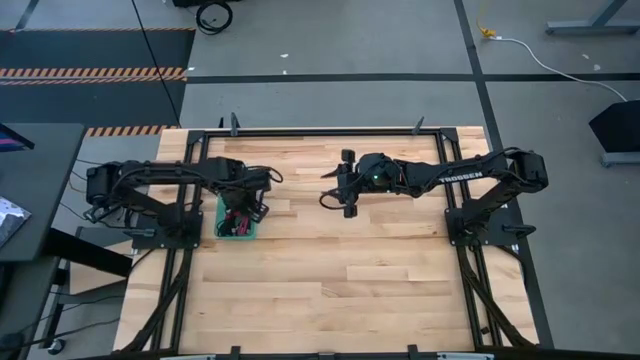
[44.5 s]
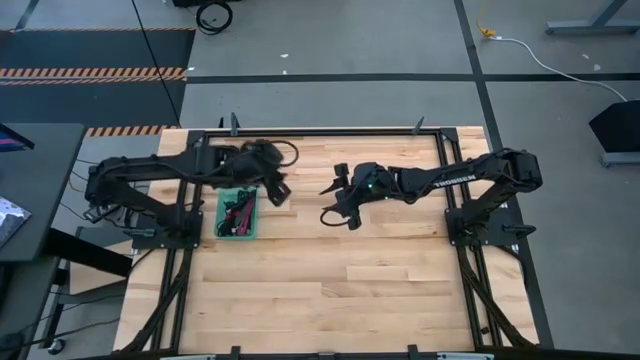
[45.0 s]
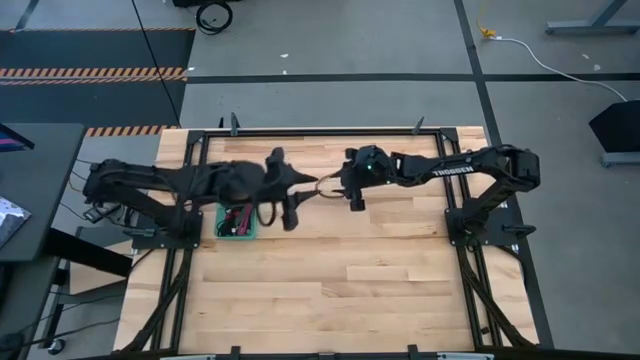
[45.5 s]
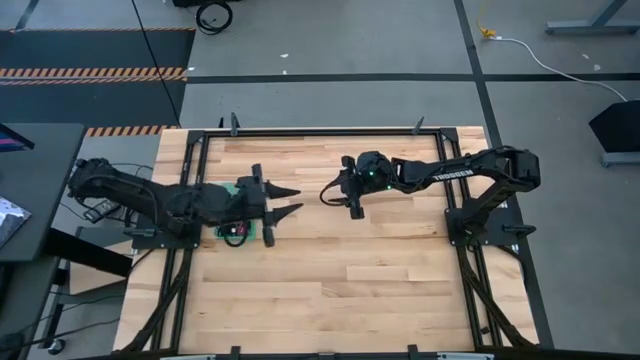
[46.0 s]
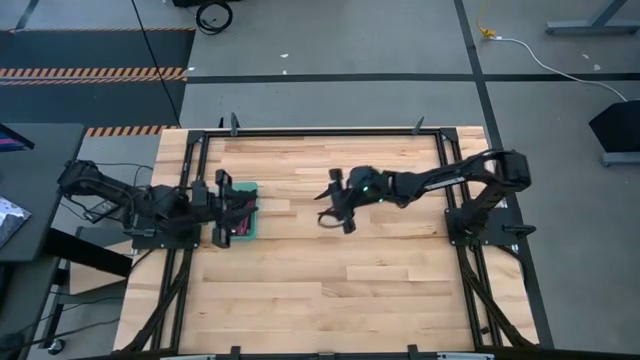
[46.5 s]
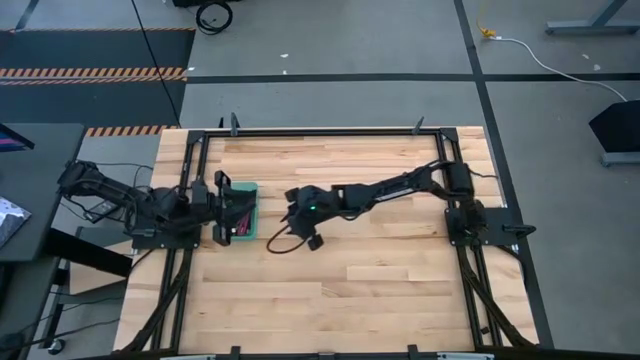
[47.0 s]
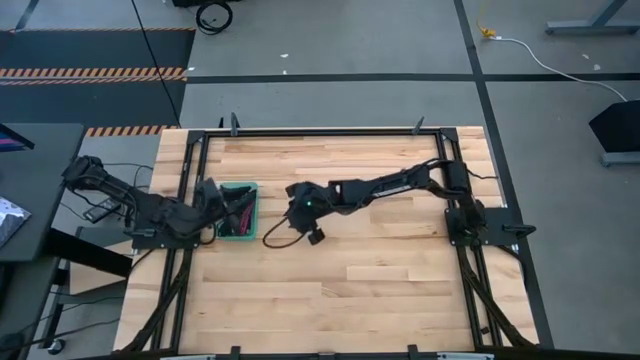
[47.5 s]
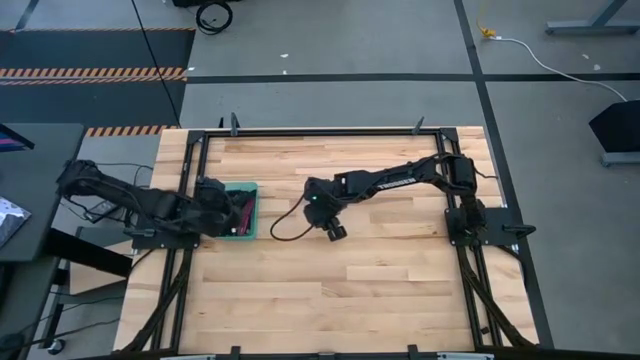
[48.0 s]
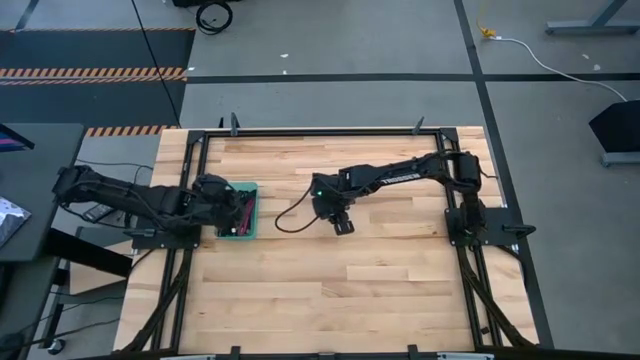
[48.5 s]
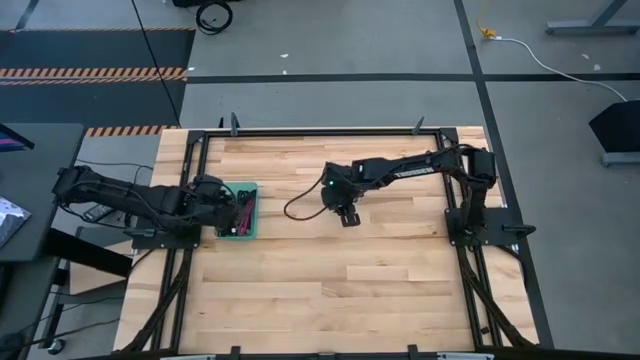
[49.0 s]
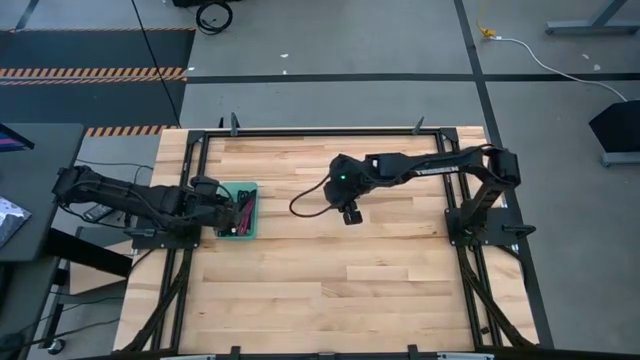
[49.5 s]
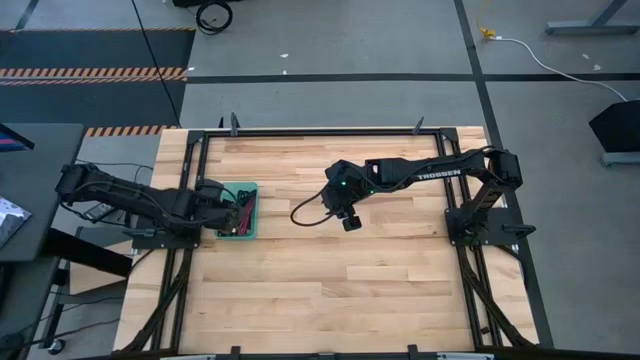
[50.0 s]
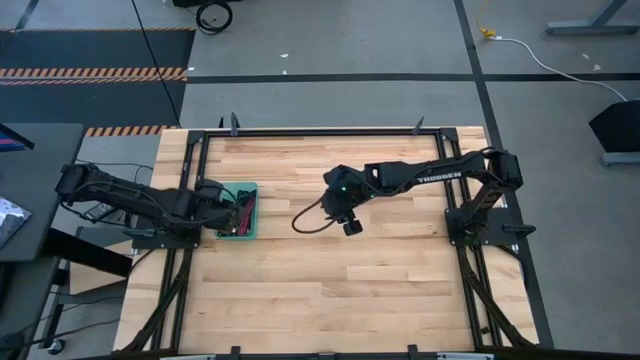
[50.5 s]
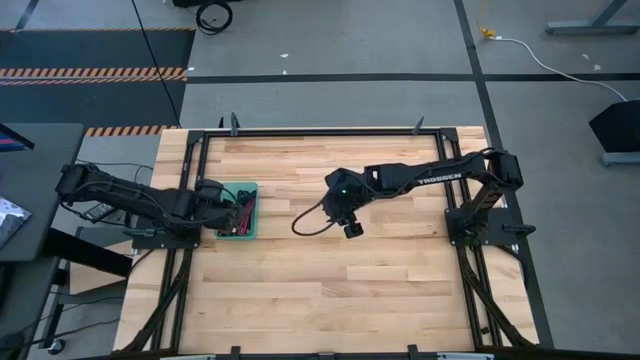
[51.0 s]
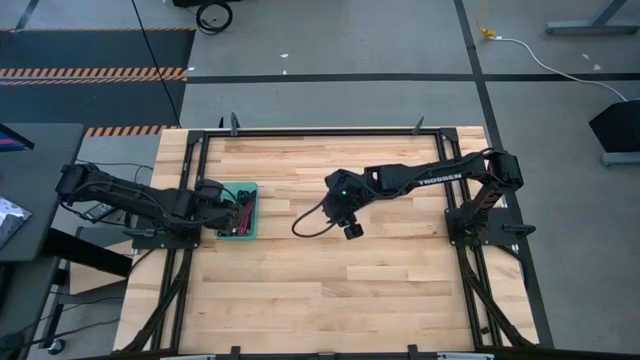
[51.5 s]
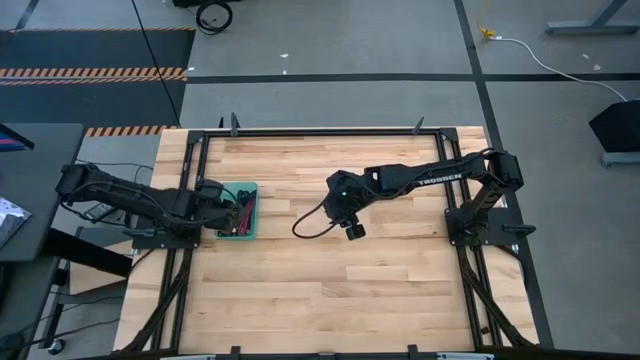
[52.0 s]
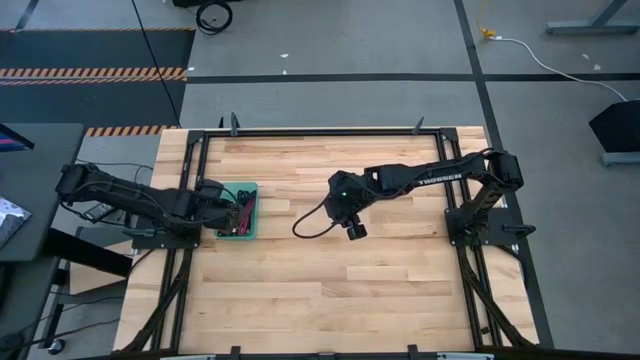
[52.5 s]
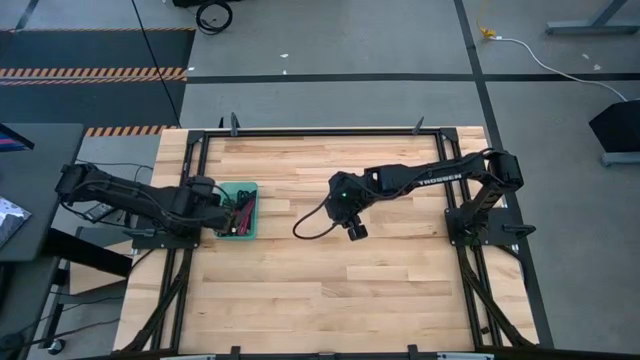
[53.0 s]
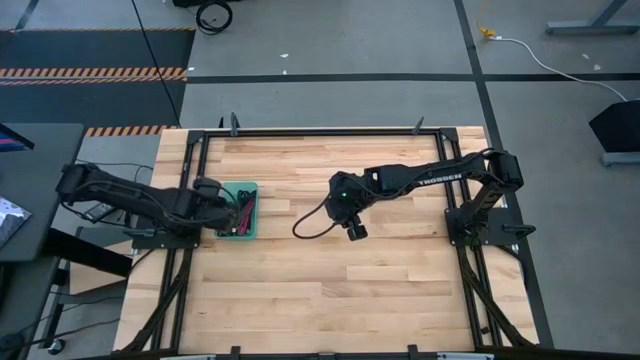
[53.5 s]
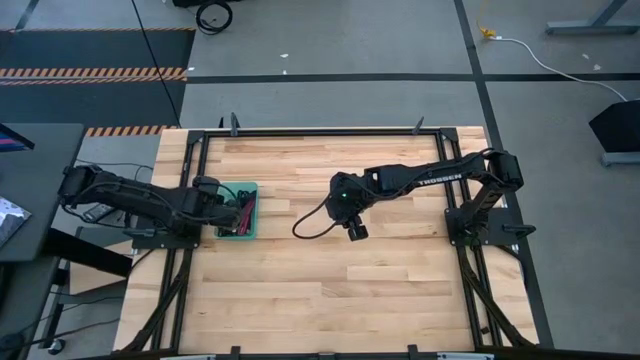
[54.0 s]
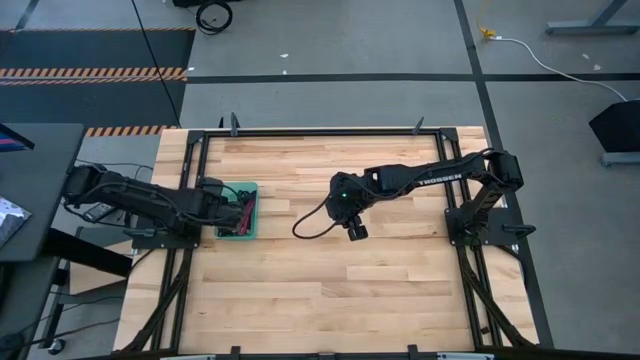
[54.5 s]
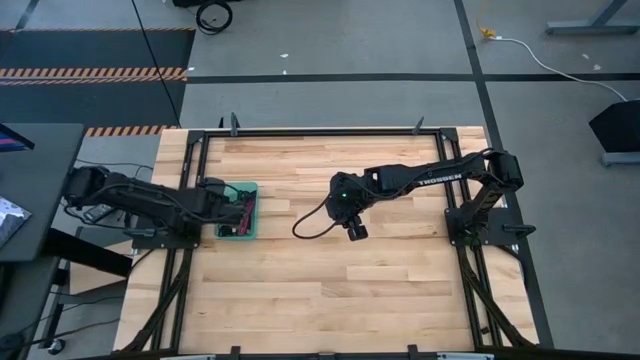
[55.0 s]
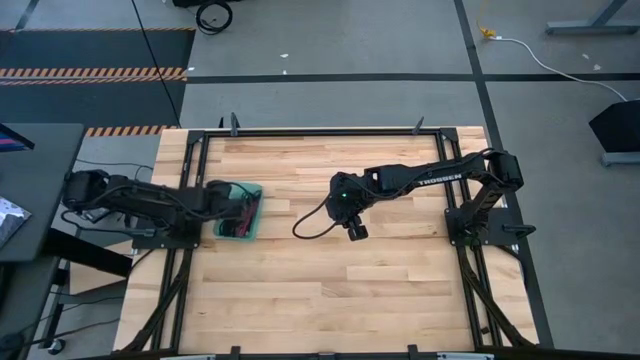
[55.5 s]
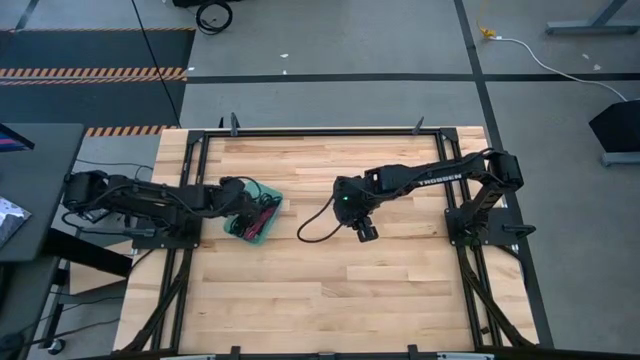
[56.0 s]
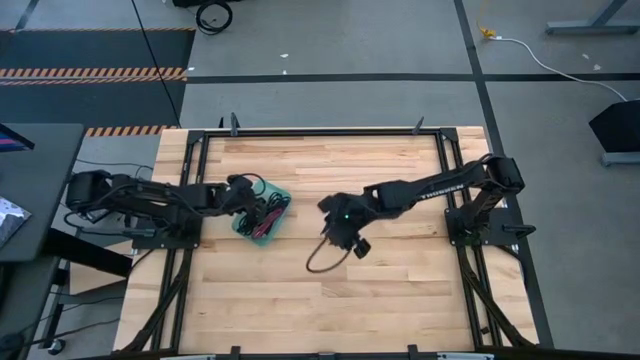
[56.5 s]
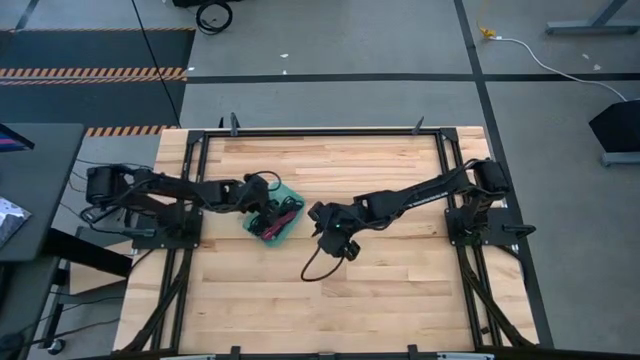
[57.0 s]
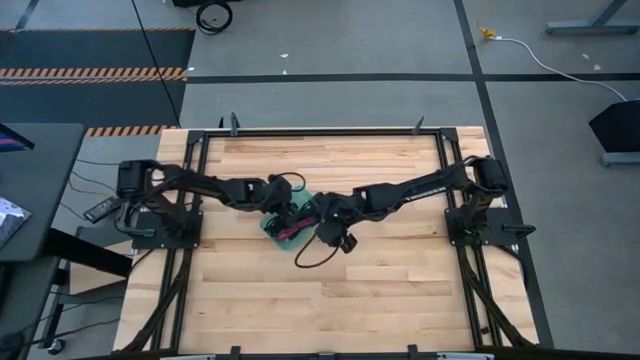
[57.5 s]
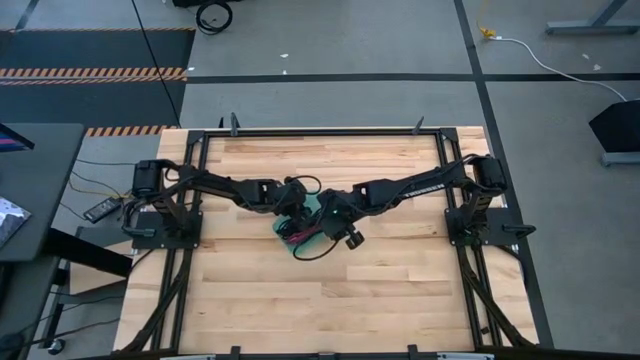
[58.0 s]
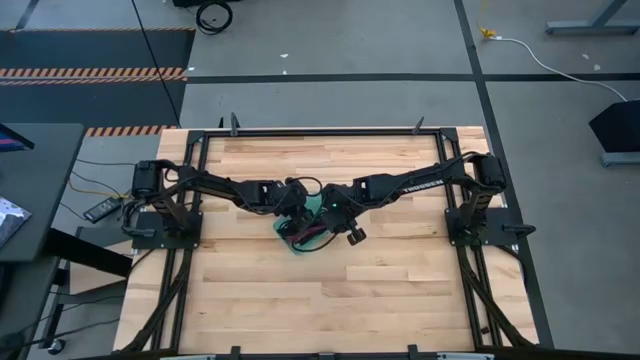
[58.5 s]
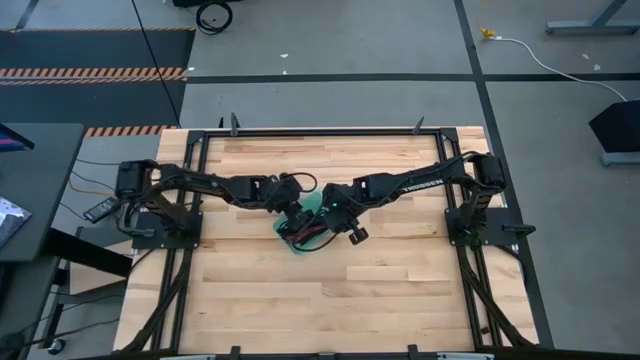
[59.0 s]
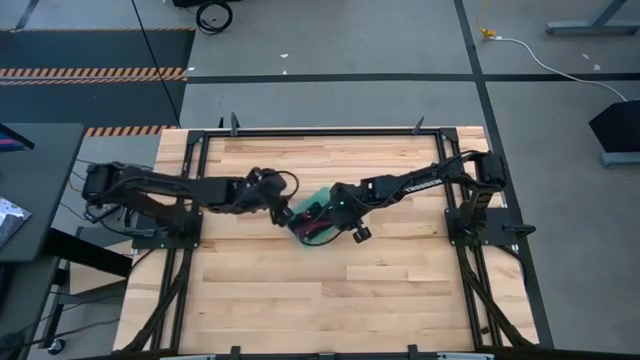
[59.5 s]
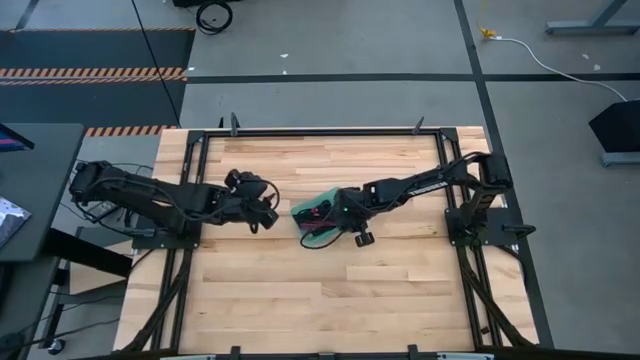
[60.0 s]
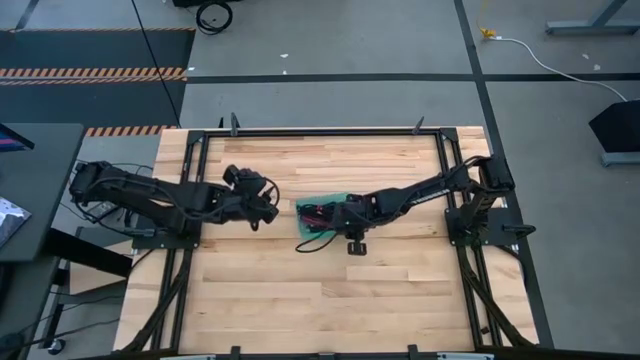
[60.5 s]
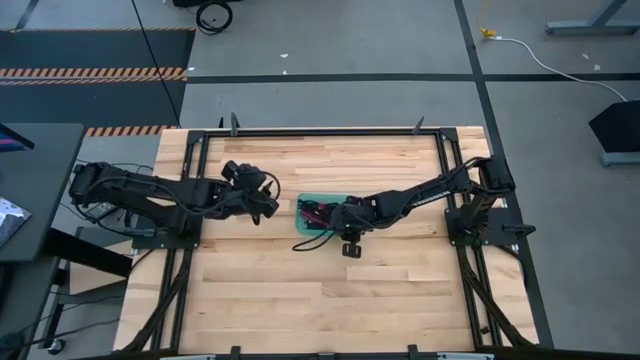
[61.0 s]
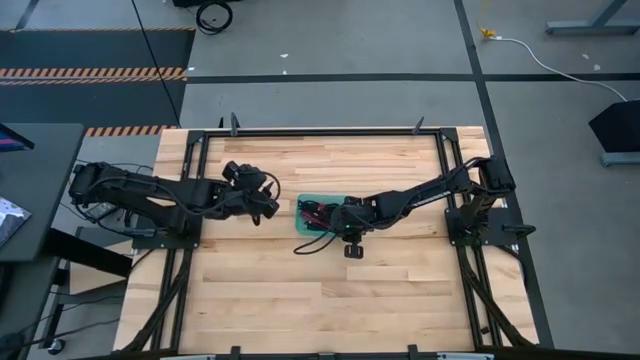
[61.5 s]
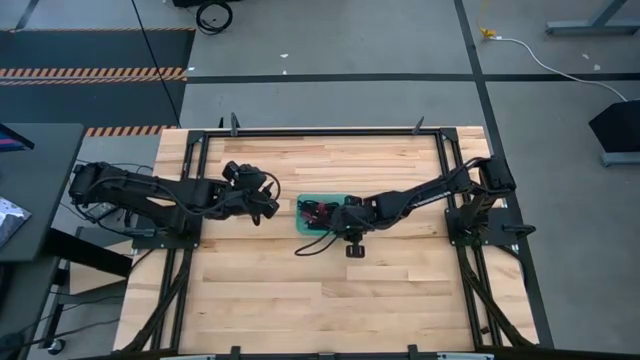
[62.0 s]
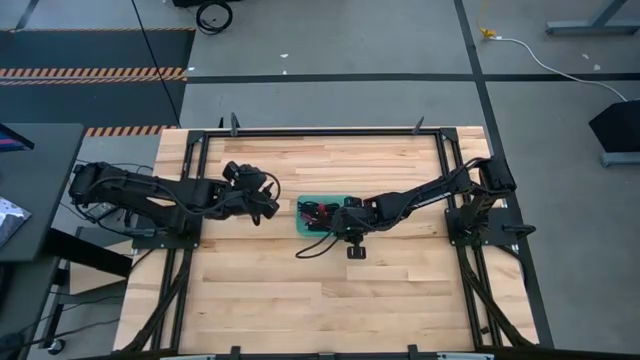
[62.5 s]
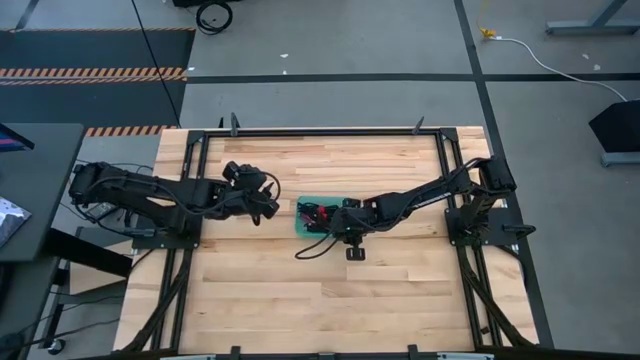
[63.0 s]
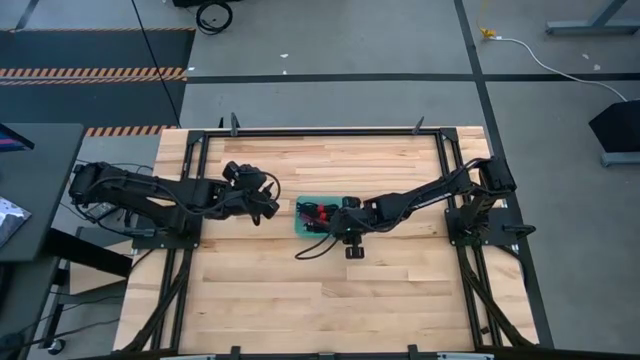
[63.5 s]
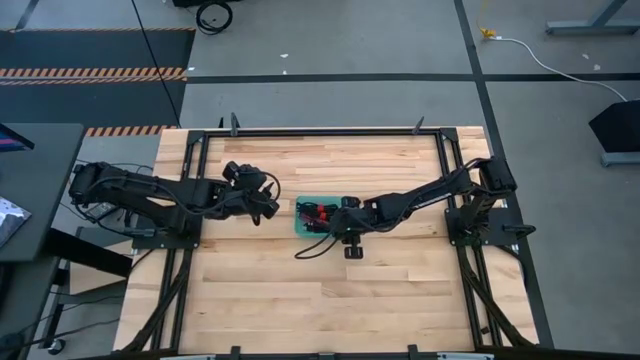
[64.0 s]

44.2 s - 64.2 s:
Task: Pick and place USB-C Cables
Move the green bin to the center of the table

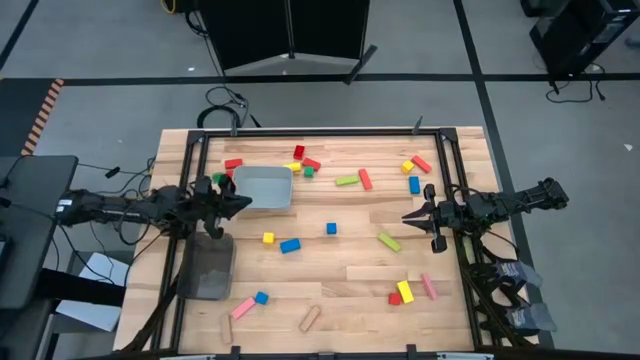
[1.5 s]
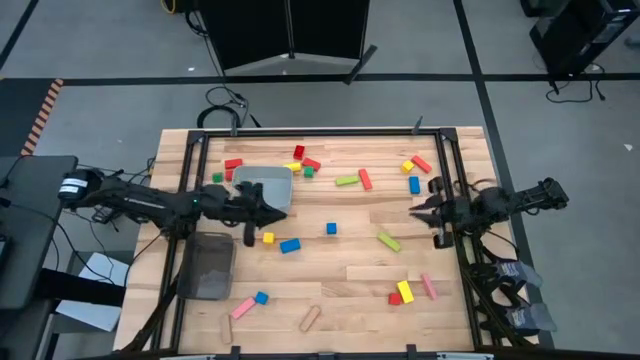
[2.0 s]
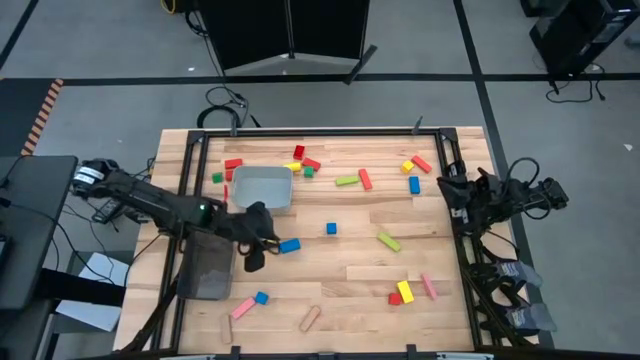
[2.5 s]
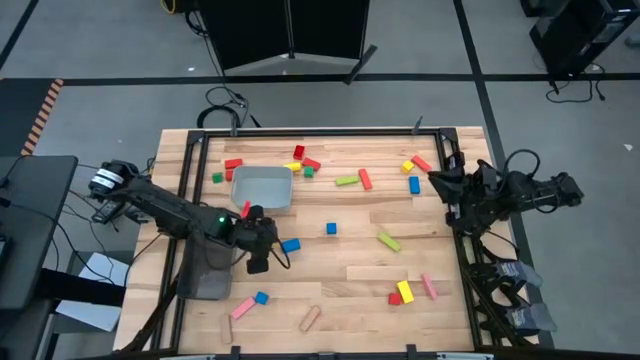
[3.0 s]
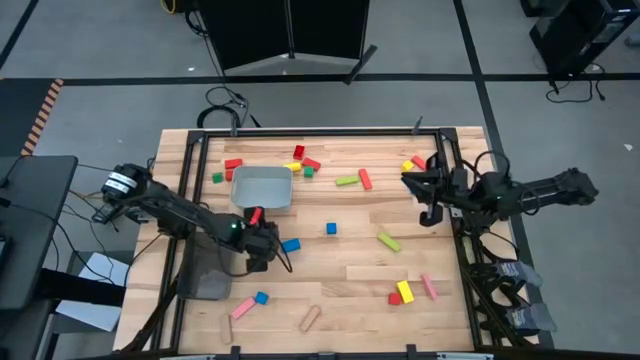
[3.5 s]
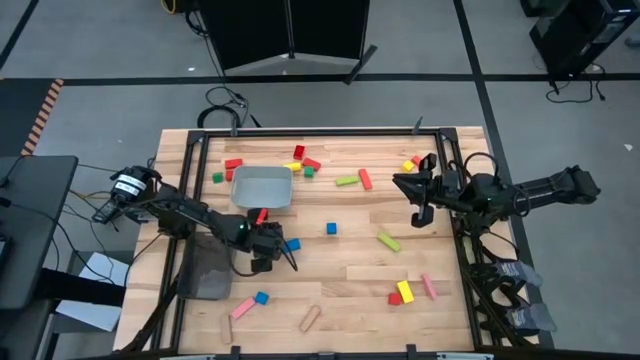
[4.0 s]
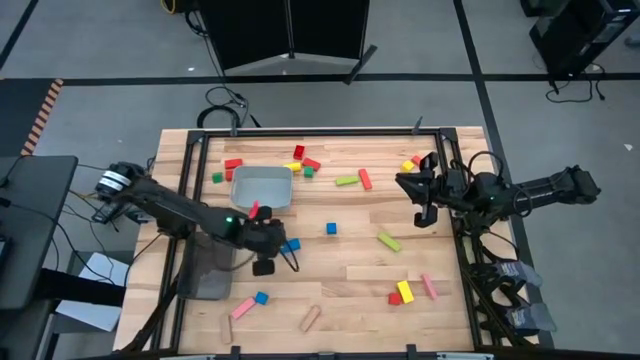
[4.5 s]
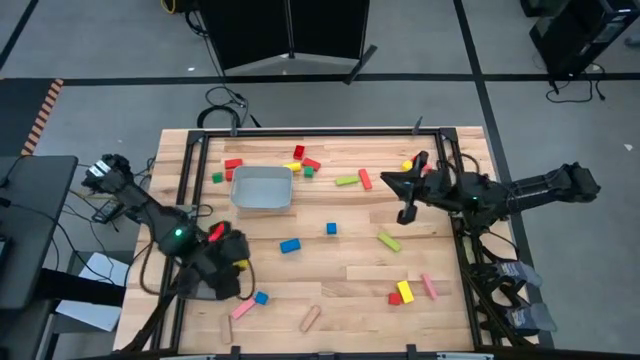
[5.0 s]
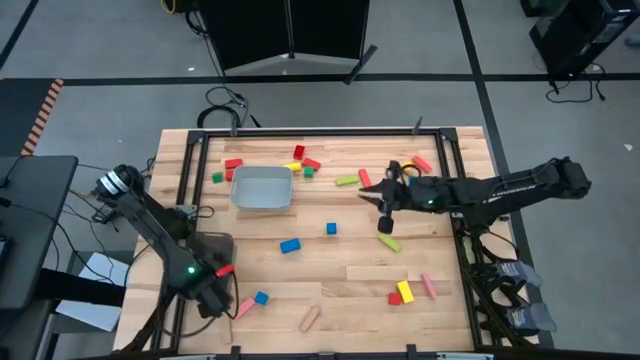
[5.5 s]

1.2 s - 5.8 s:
Task: Sort blocks by size
Put the yellow square block into the black bin
